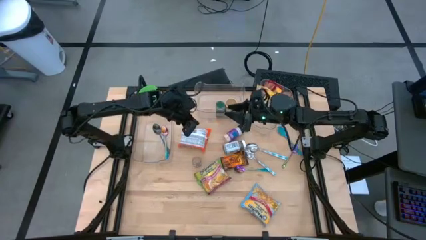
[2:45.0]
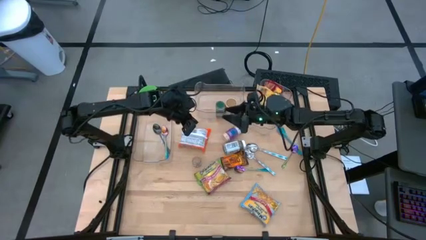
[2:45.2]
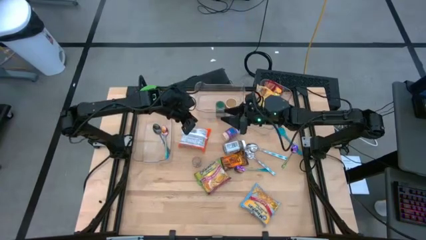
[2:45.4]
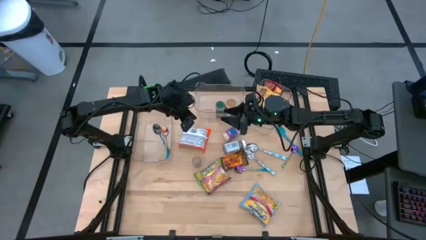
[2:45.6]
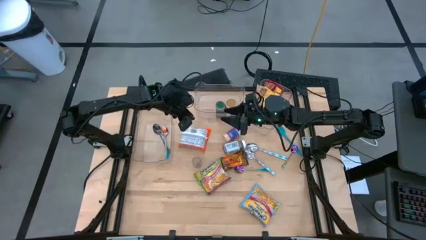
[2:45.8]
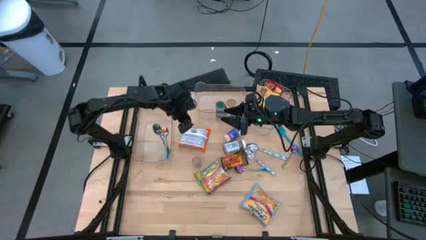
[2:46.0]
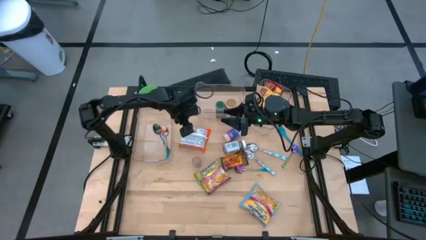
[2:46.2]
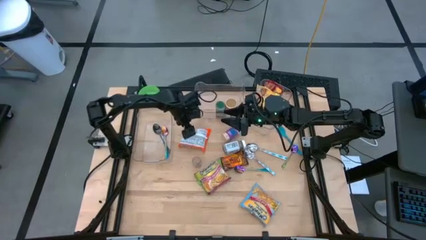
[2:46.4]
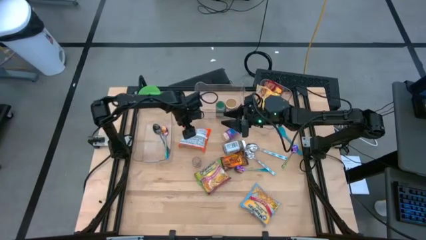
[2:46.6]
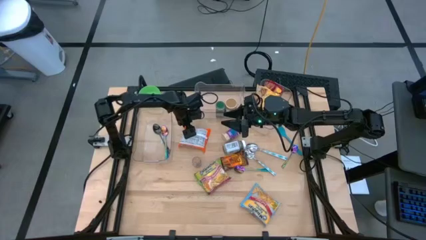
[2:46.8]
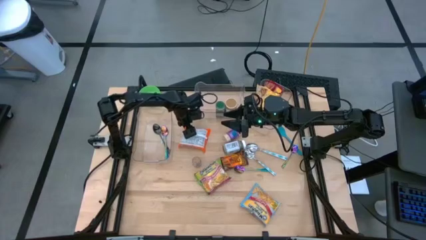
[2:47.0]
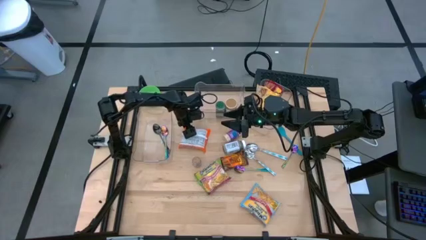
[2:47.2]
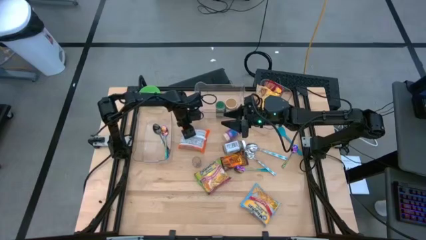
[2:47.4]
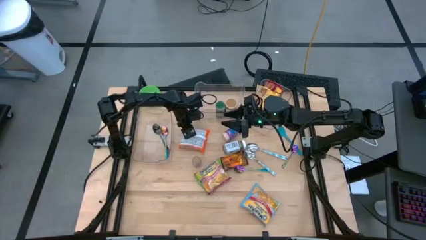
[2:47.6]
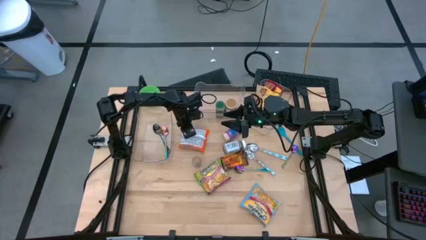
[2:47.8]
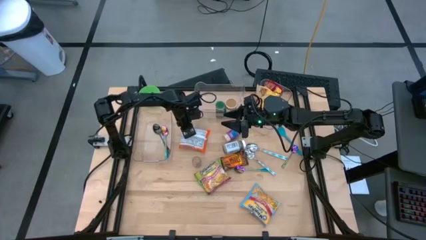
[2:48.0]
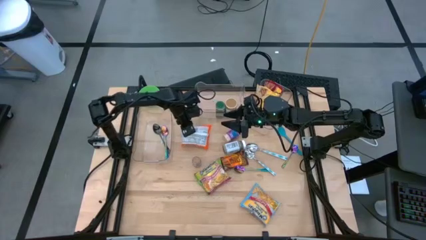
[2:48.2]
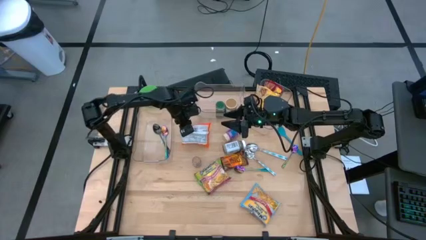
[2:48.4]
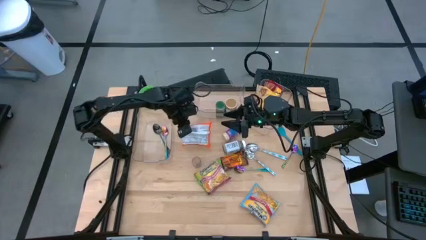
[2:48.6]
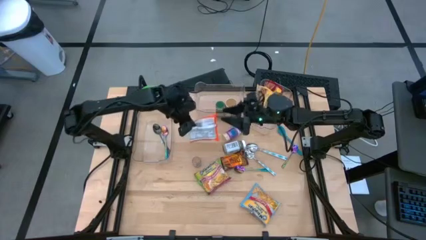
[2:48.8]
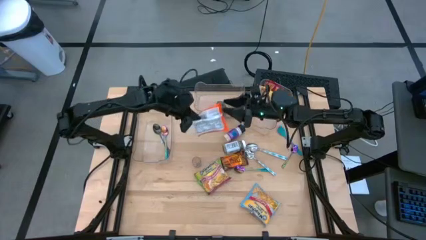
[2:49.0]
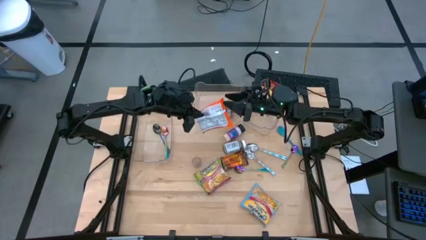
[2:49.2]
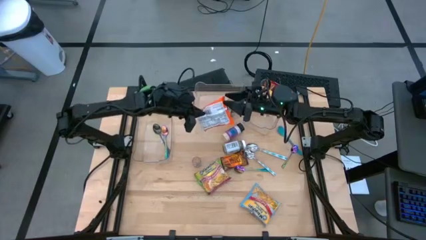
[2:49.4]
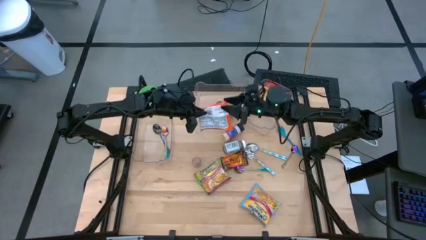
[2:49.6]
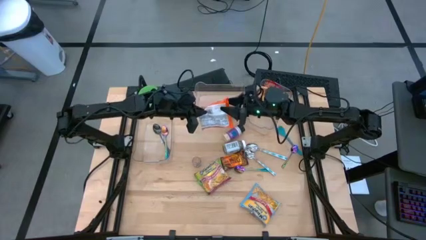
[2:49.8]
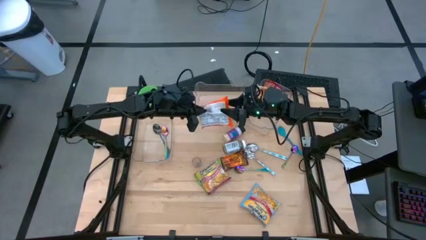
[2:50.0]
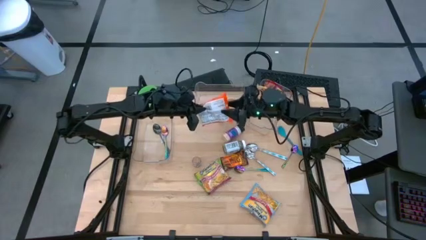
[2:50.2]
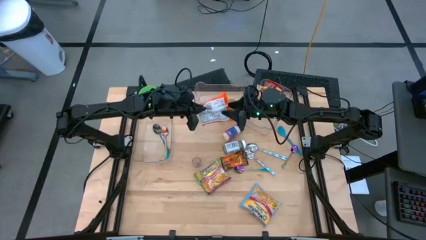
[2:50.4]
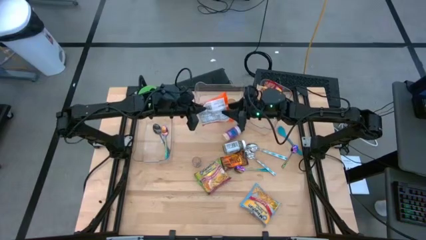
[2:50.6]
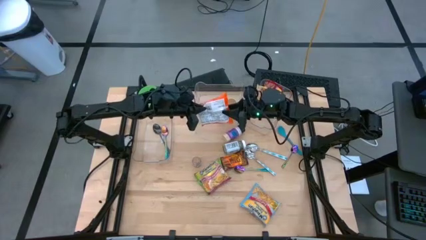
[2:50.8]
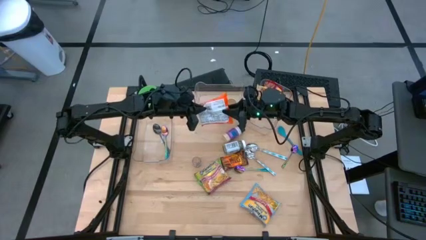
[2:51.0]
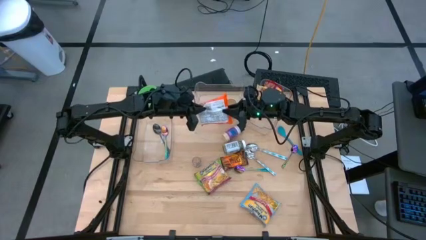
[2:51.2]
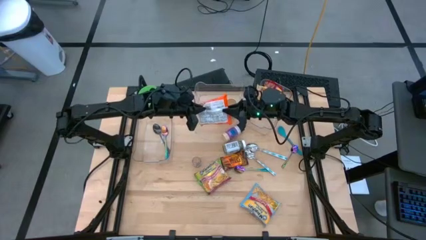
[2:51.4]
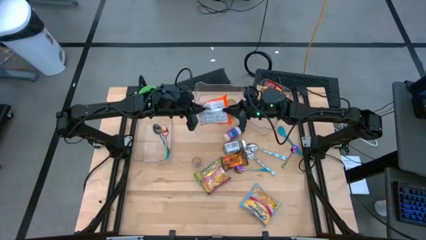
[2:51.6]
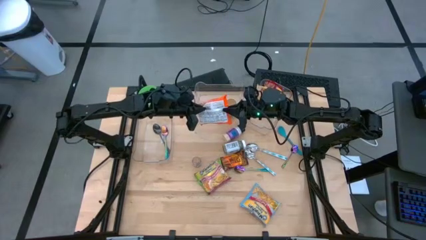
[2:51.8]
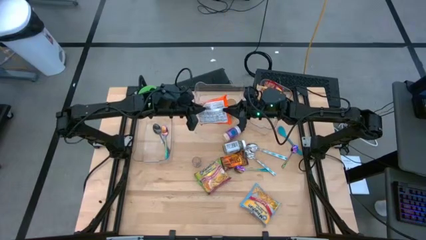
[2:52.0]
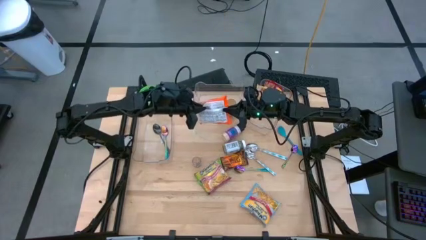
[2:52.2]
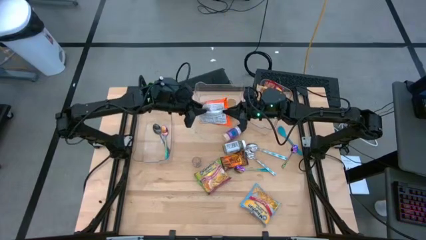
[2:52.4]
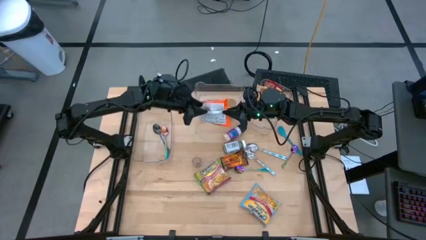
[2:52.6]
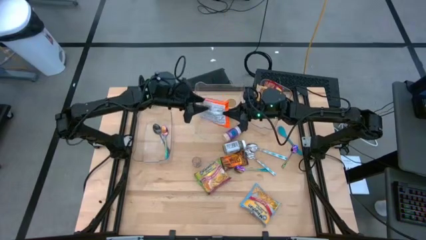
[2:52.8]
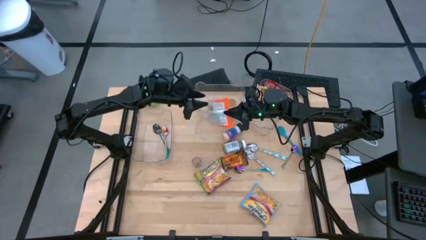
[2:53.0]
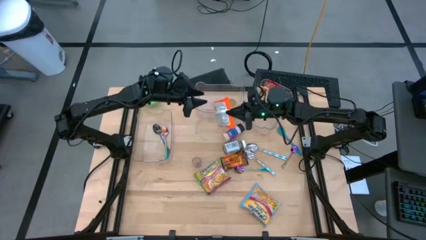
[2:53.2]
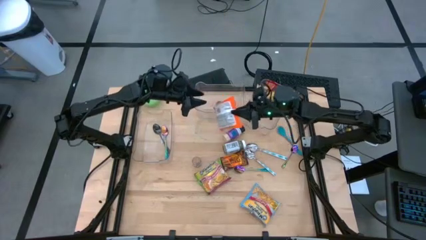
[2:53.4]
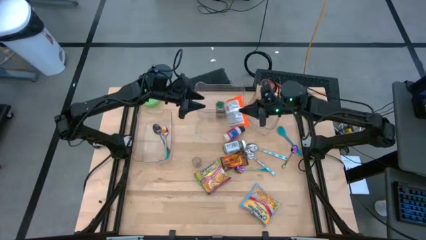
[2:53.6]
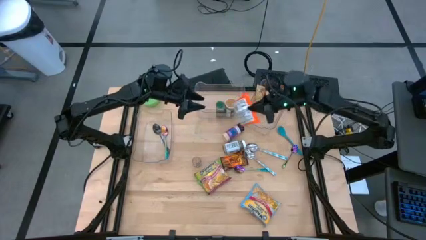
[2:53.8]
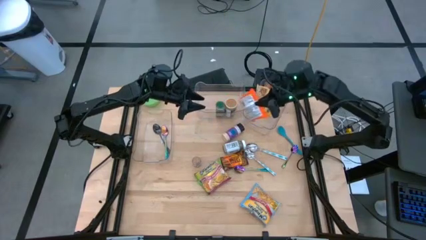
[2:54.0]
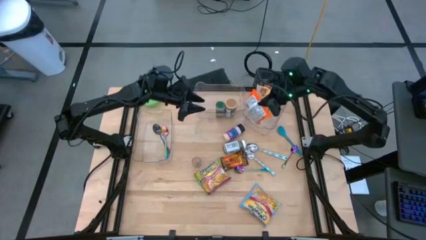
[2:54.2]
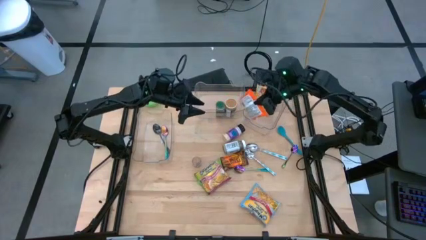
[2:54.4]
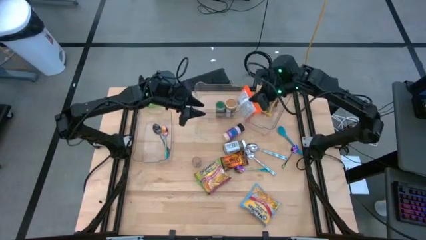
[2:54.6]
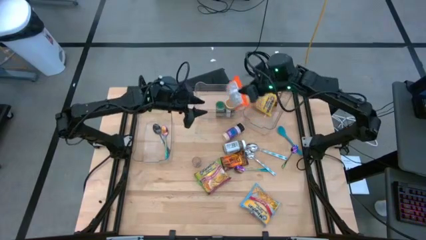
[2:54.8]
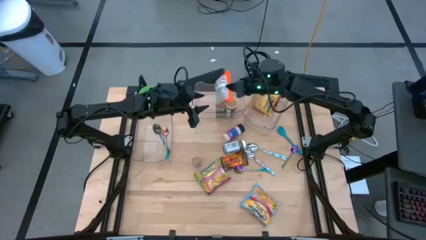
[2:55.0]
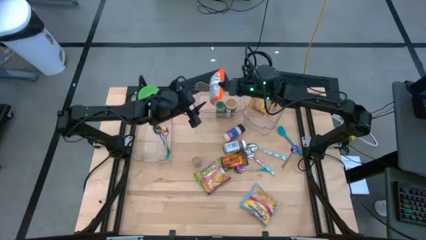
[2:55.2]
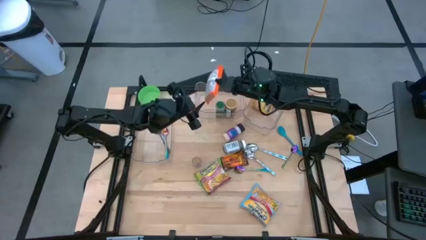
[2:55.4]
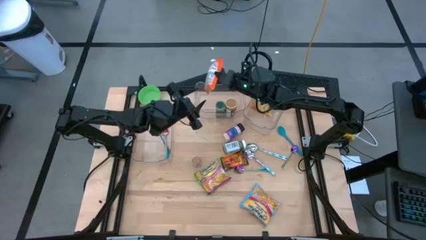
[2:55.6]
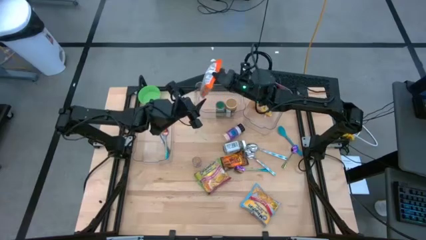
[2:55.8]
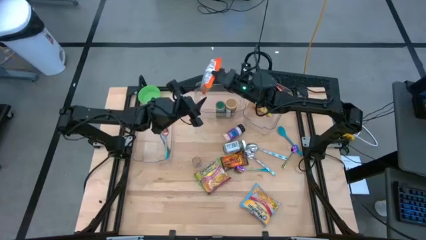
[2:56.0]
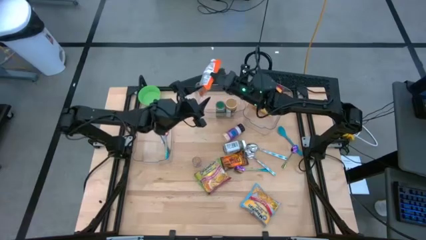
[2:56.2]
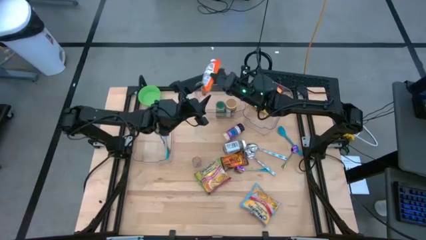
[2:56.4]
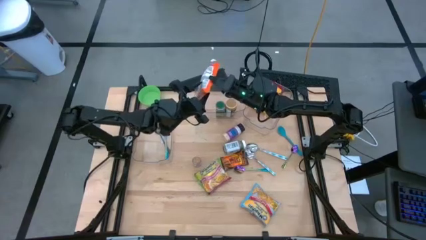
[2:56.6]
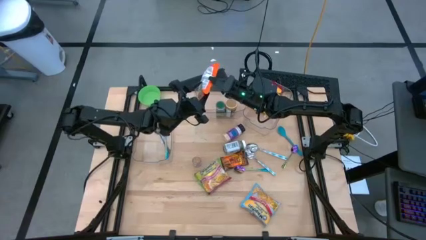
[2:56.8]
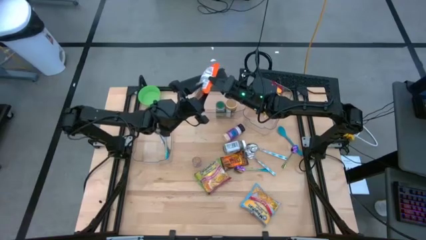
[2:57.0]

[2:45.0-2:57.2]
Task: Pick & Place Food Item
Put the orange noodle pack into the right transparent bin

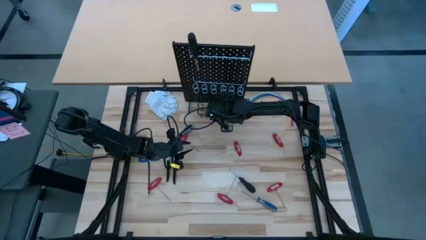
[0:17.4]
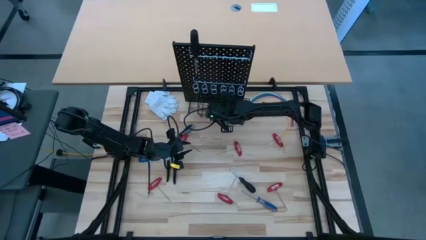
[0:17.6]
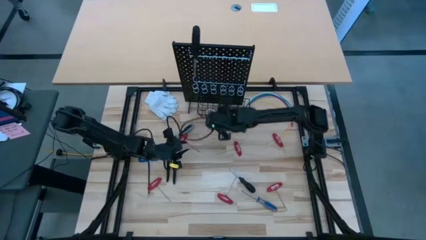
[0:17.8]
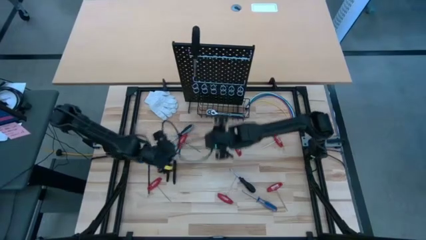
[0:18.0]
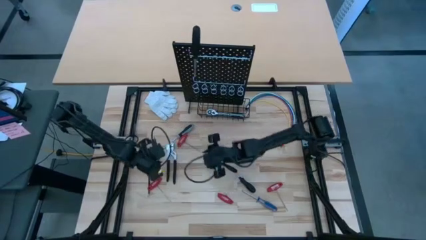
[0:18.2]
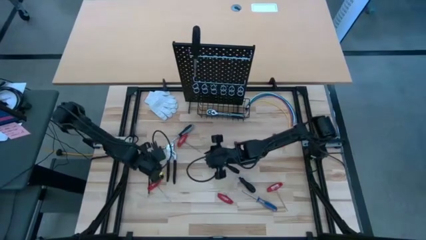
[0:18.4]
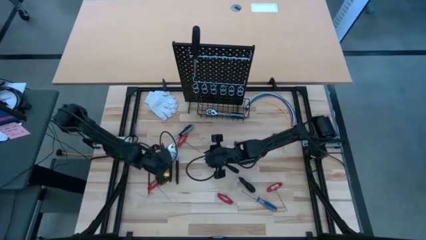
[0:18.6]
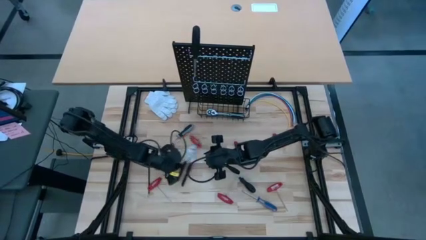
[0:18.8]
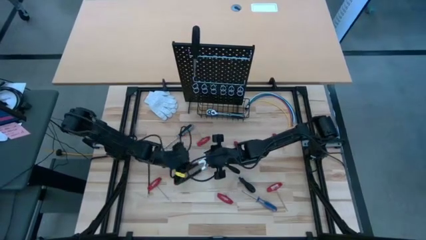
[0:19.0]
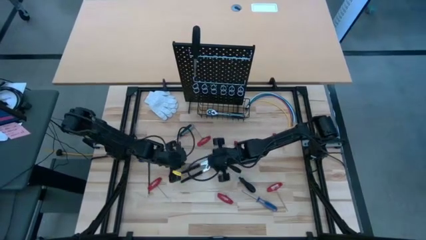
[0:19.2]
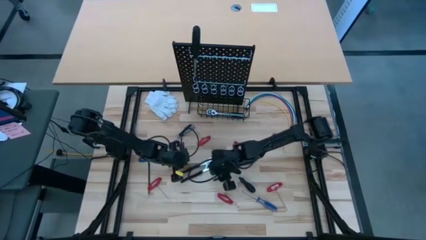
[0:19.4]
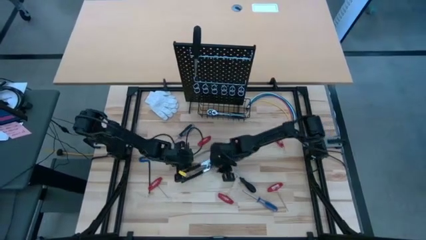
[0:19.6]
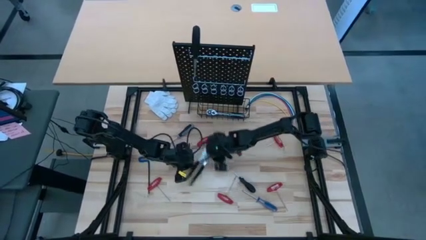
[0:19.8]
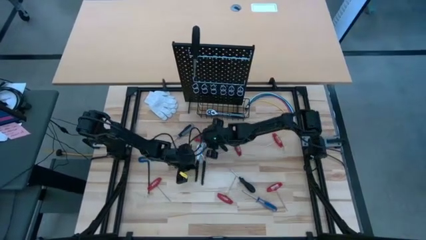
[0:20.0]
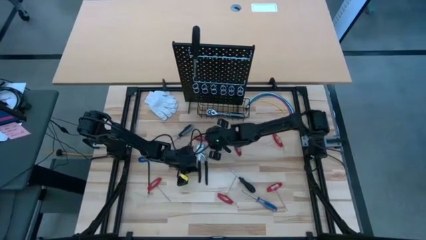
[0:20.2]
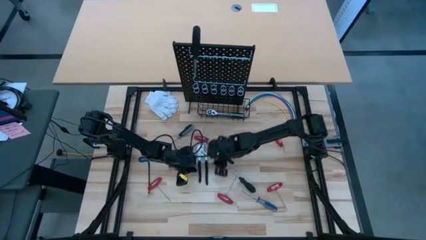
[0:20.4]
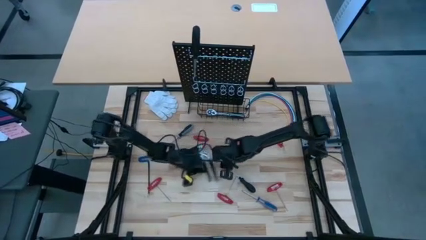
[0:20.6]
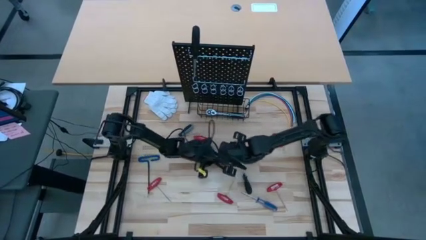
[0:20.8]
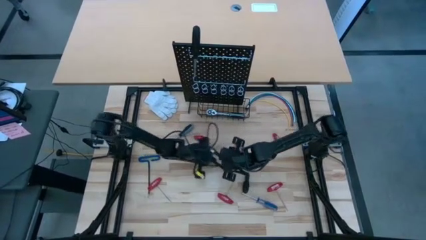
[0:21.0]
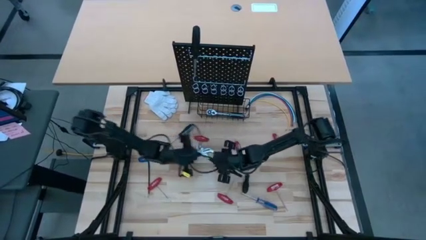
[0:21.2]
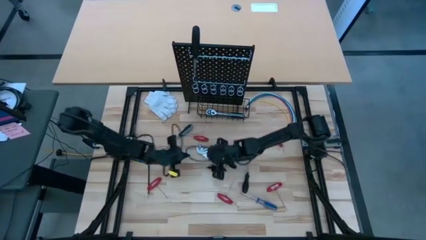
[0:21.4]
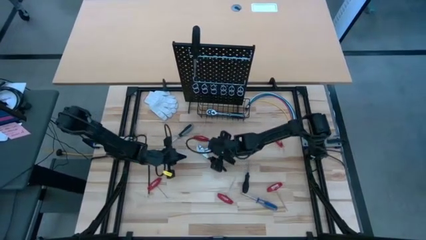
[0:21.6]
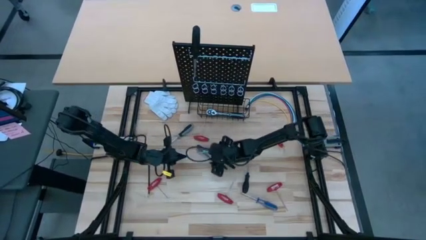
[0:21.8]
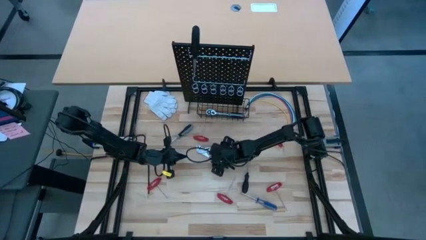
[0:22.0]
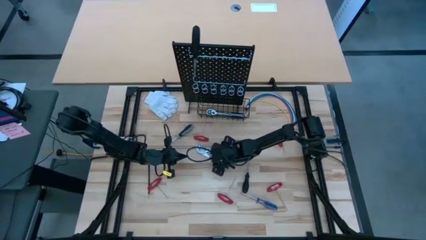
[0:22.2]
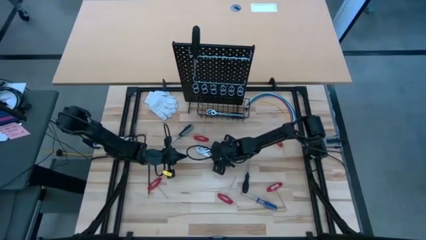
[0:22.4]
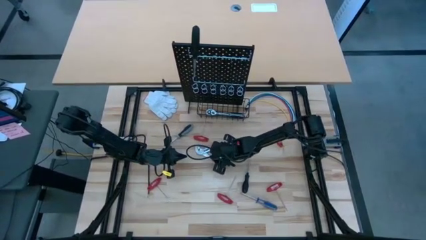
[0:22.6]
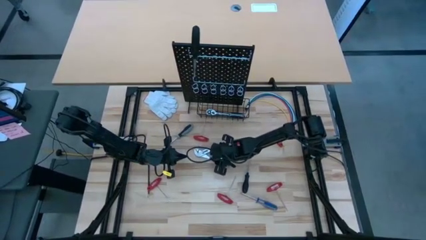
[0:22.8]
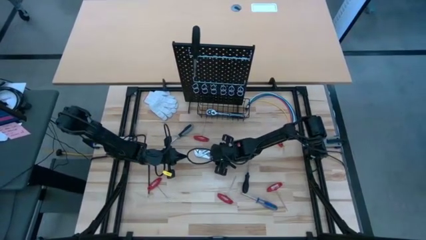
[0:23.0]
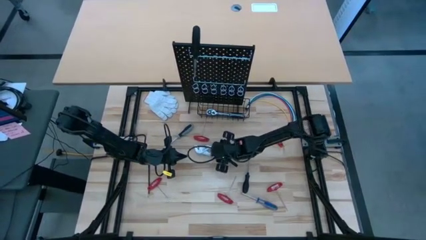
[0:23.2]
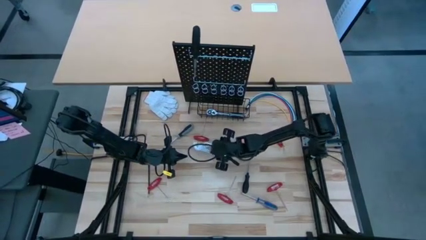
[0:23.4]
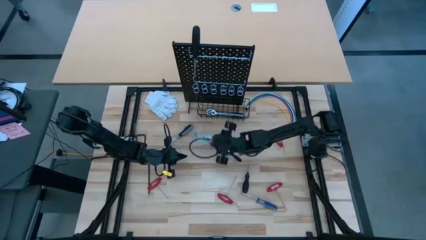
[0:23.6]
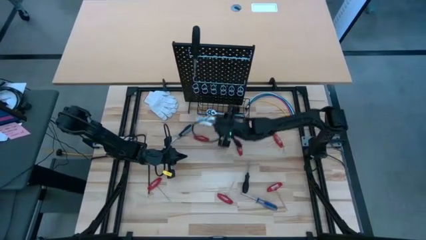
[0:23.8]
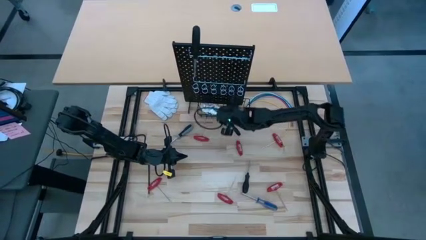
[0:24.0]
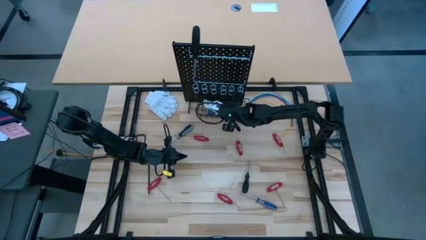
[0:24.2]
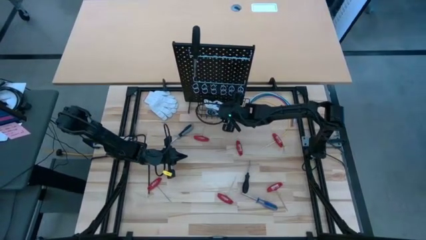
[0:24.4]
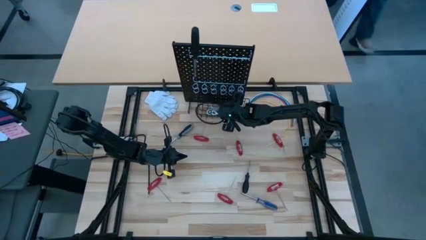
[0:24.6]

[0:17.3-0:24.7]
Task: Hang tools onto peg board
Put the black adjustable plier in the mesh basket on the pegboard
